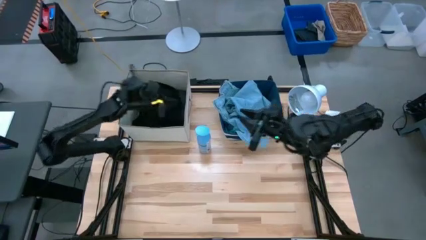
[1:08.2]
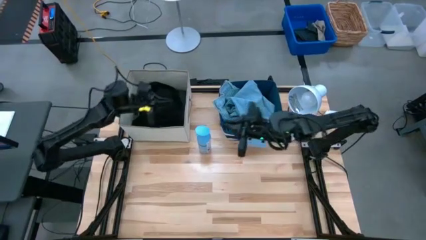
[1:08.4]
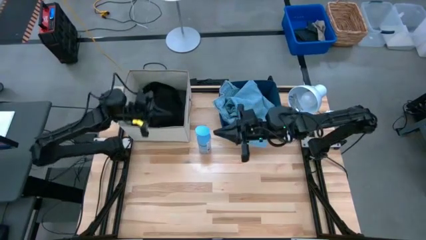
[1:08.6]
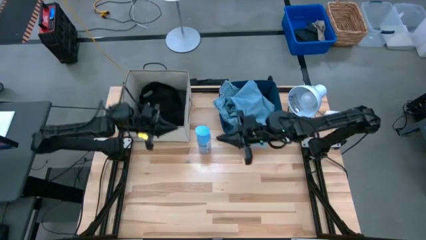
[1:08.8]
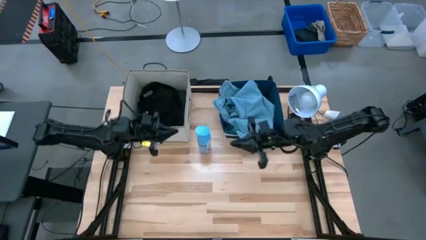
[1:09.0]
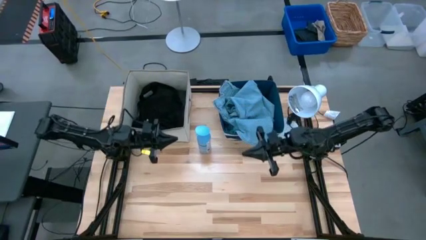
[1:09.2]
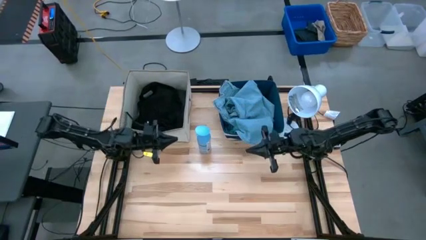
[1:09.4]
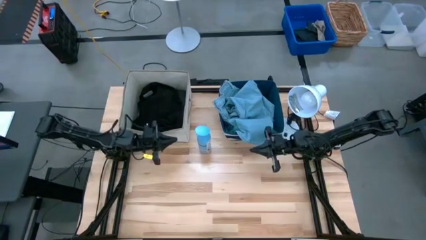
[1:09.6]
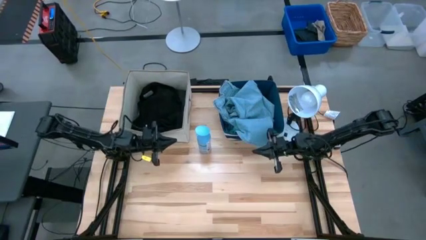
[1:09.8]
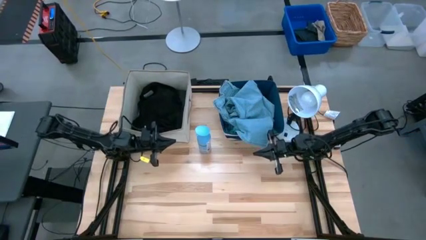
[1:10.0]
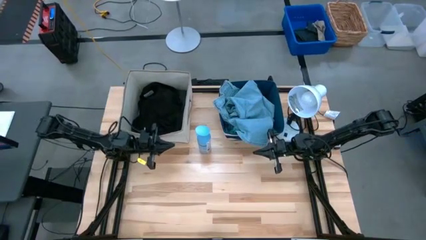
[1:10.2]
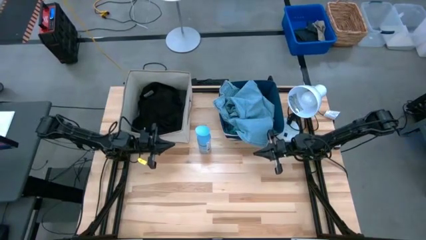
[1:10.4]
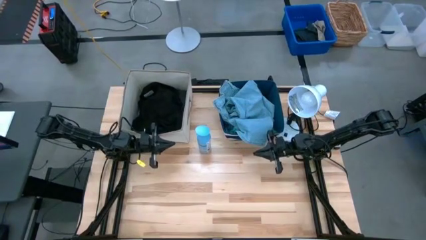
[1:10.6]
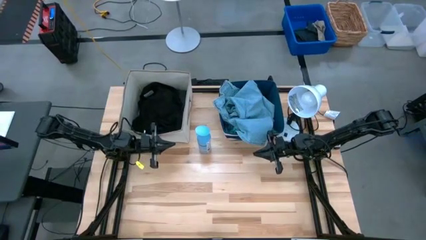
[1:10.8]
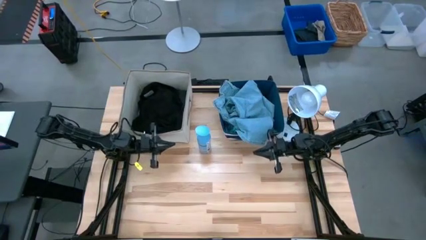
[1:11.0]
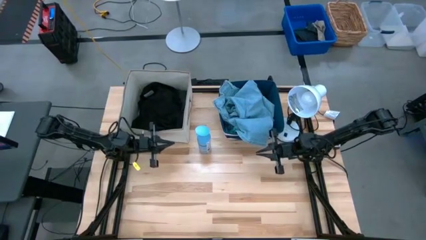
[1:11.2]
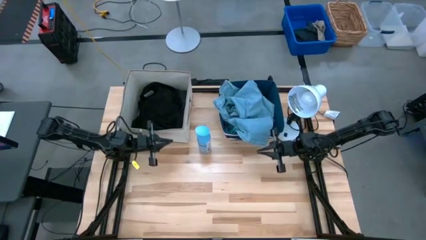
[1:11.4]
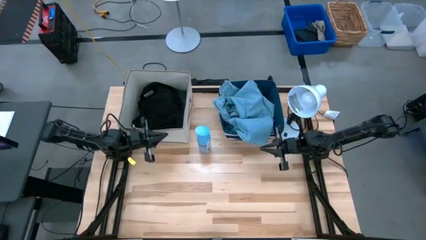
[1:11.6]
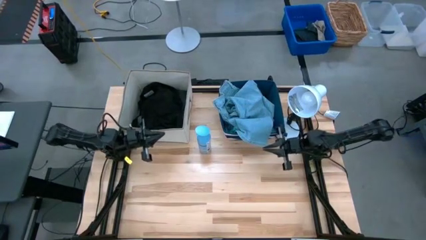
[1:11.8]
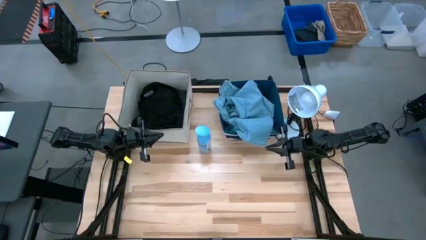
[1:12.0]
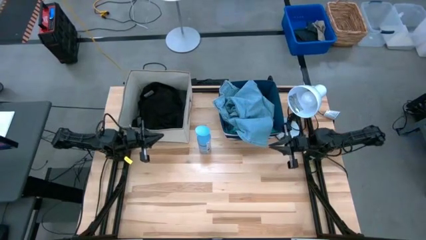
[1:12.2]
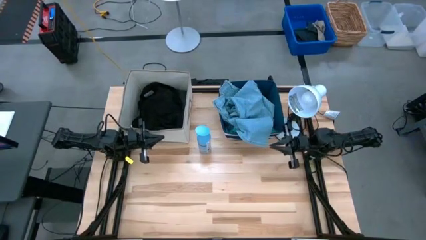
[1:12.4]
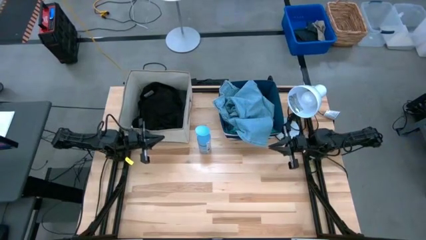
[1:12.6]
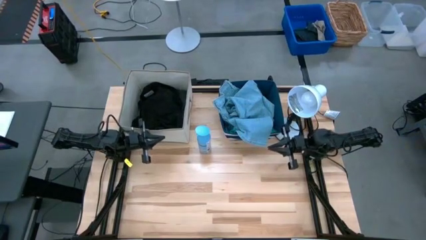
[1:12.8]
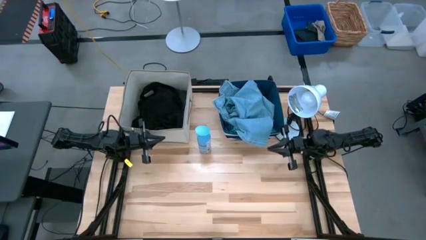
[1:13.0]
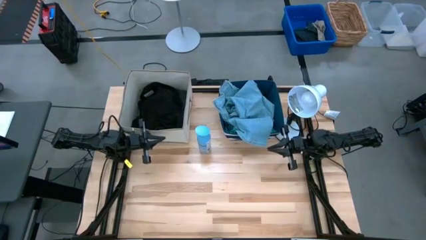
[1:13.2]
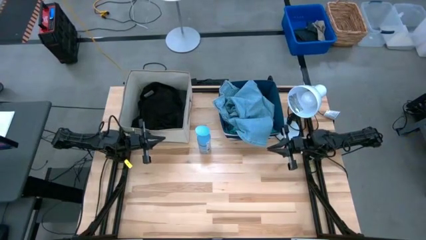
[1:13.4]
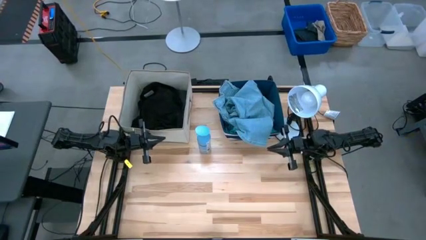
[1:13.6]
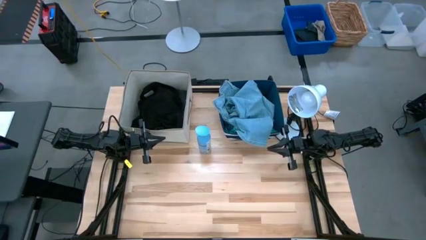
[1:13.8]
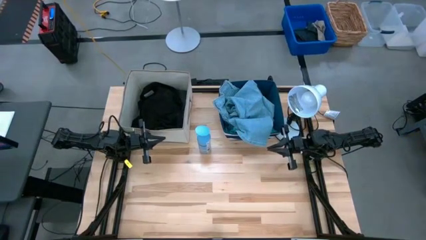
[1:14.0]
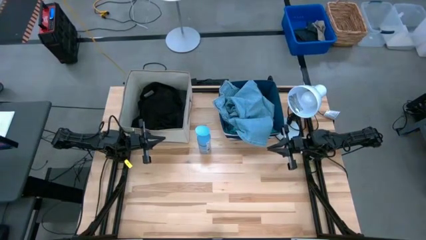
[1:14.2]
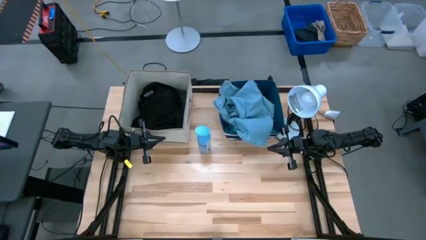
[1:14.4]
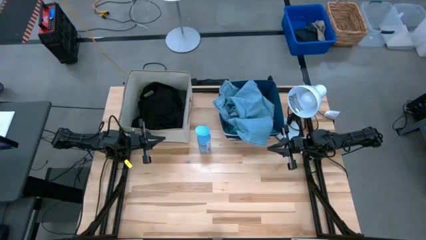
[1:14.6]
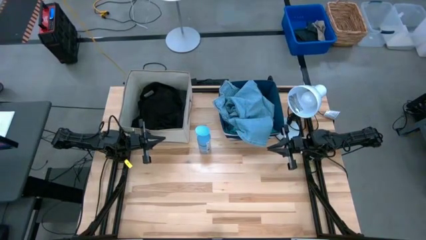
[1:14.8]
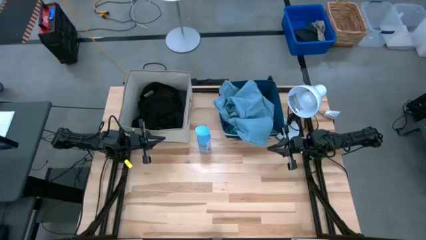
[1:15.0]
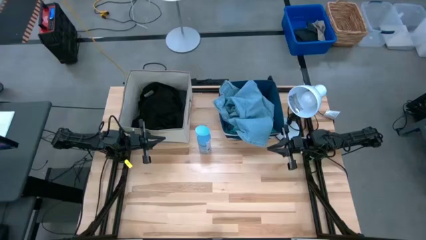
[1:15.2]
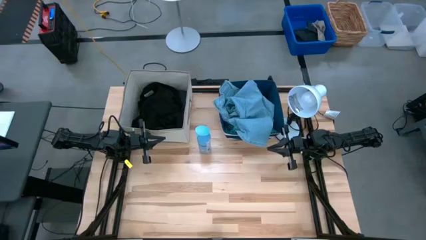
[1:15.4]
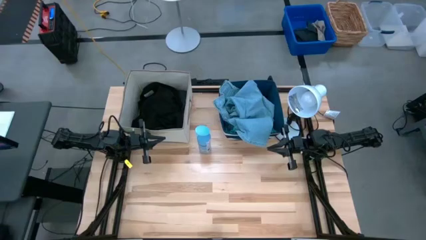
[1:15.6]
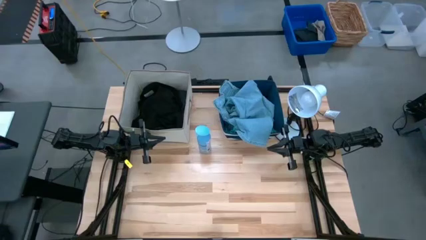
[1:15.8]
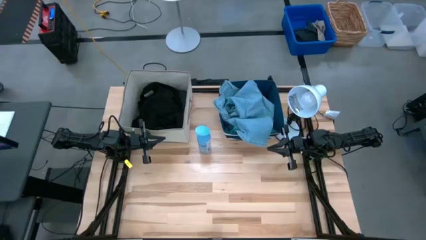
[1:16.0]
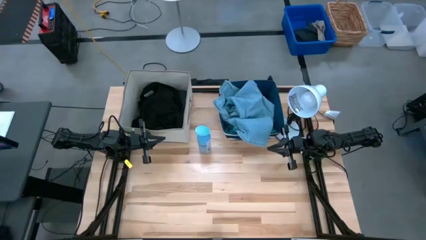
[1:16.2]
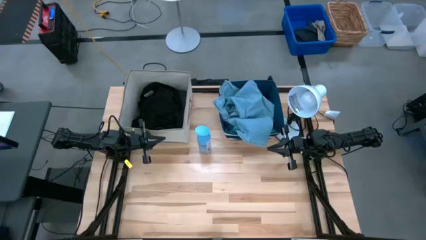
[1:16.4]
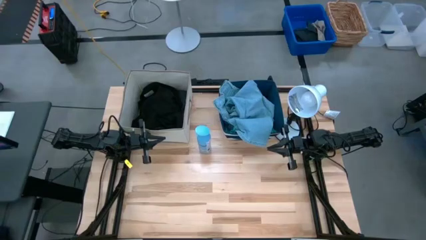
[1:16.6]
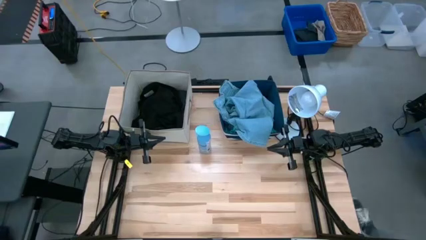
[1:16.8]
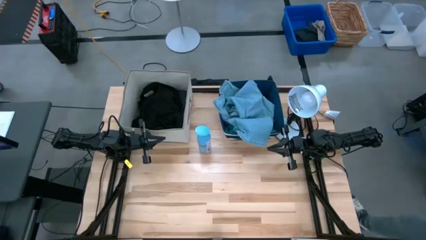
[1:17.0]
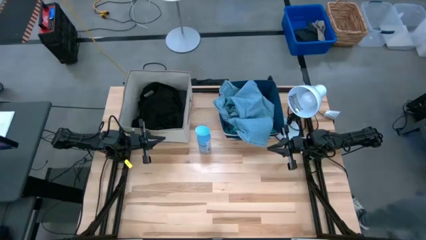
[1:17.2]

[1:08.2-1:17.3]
Task: Sort clothes
Return to Home Position

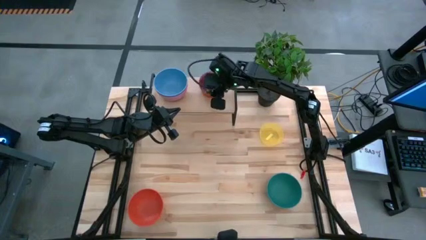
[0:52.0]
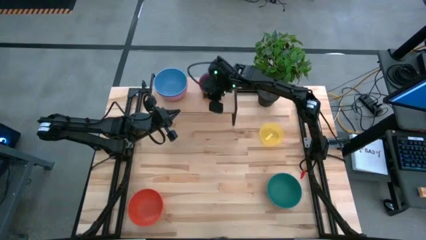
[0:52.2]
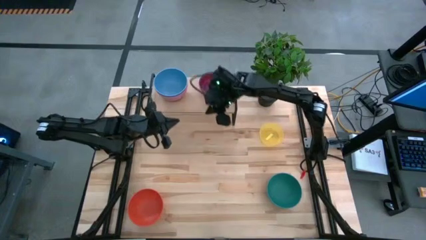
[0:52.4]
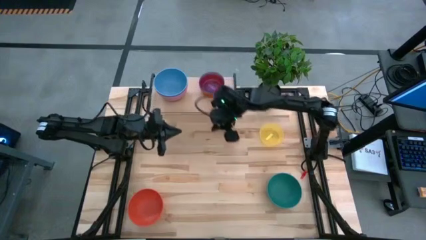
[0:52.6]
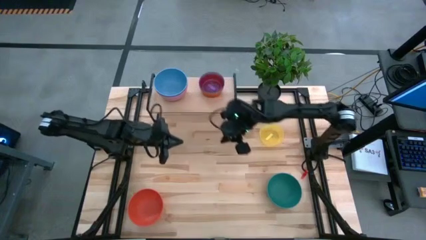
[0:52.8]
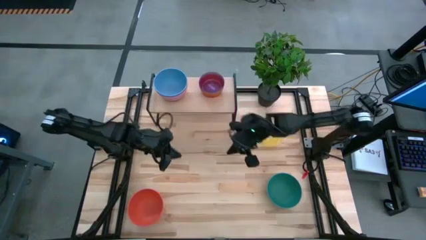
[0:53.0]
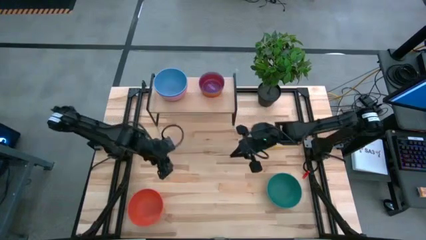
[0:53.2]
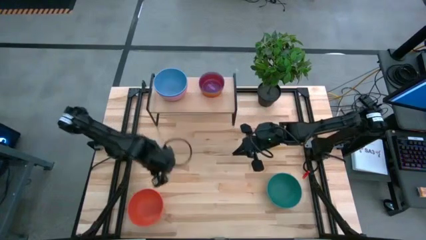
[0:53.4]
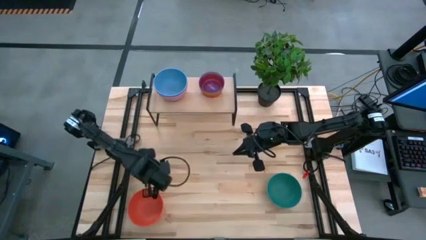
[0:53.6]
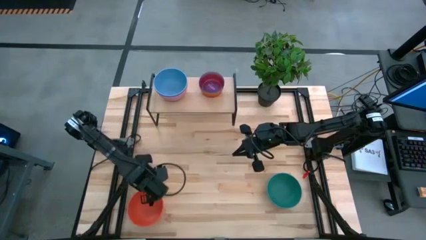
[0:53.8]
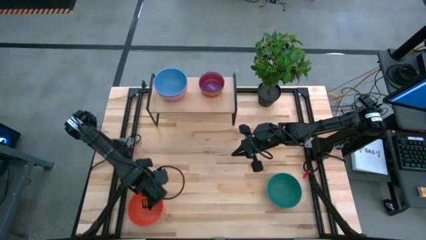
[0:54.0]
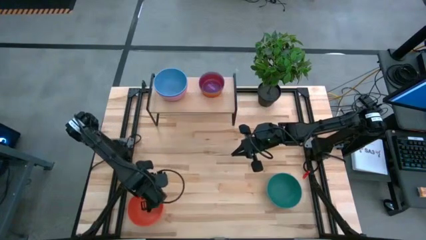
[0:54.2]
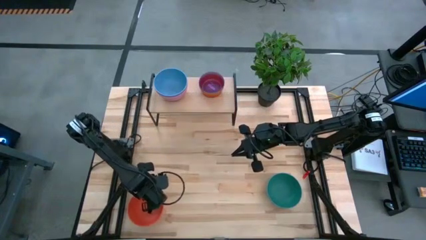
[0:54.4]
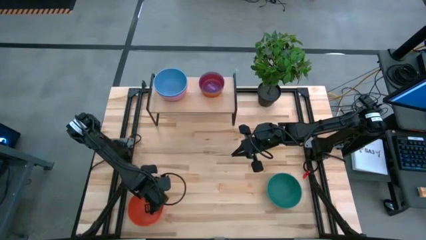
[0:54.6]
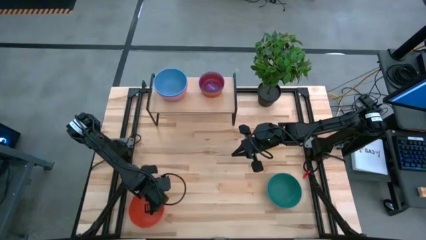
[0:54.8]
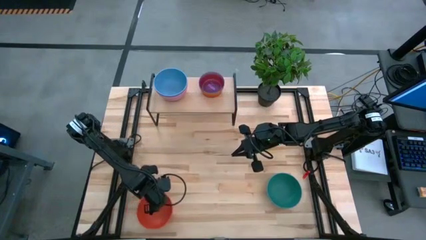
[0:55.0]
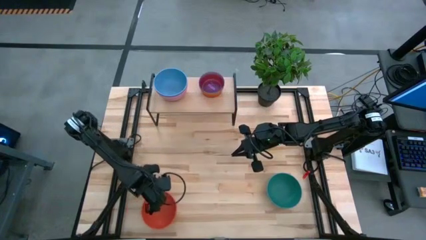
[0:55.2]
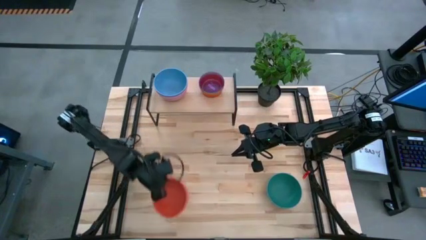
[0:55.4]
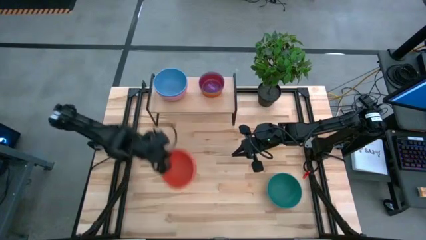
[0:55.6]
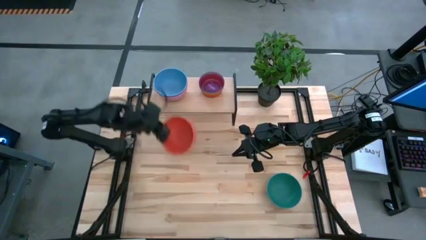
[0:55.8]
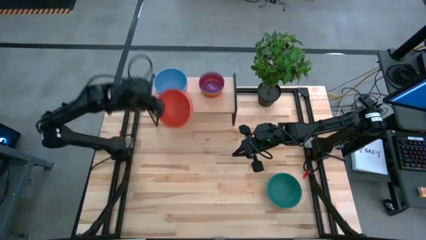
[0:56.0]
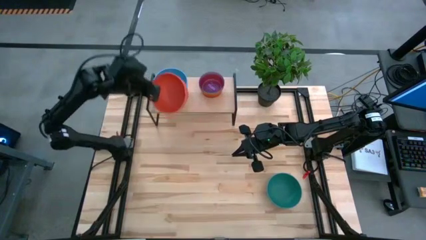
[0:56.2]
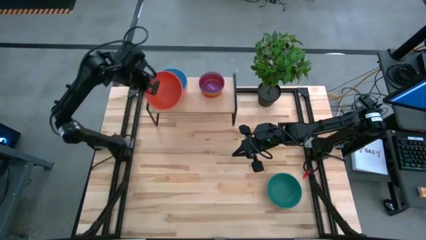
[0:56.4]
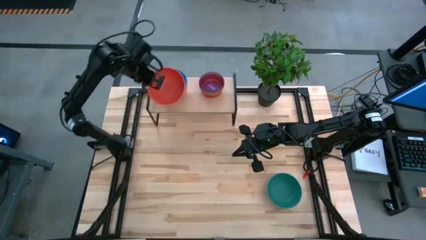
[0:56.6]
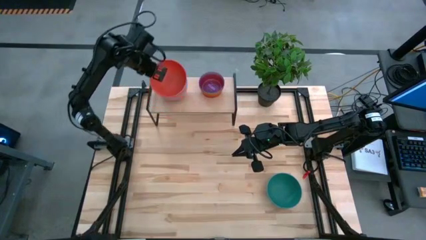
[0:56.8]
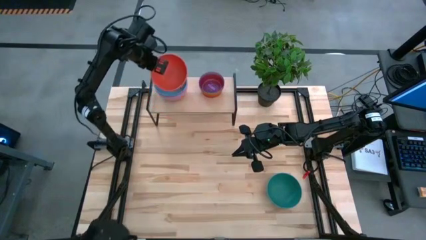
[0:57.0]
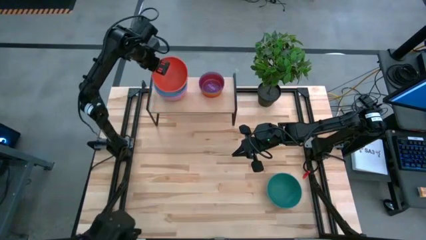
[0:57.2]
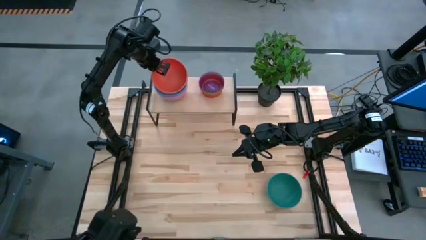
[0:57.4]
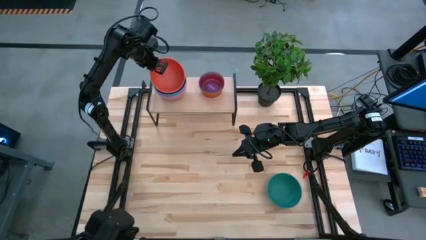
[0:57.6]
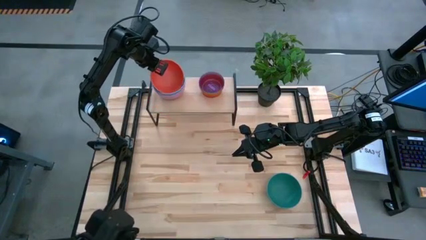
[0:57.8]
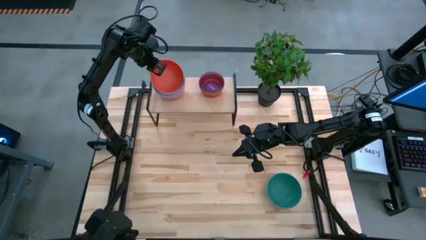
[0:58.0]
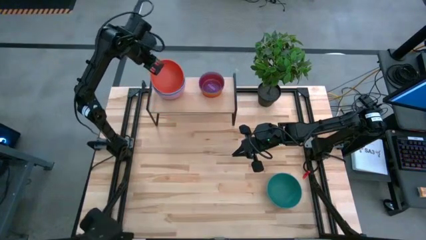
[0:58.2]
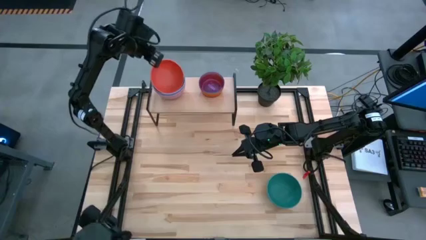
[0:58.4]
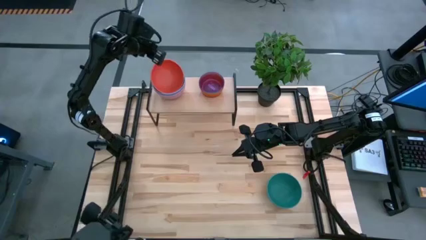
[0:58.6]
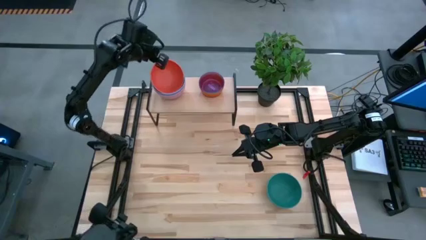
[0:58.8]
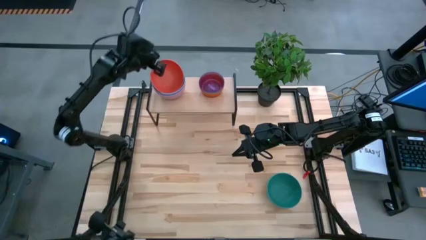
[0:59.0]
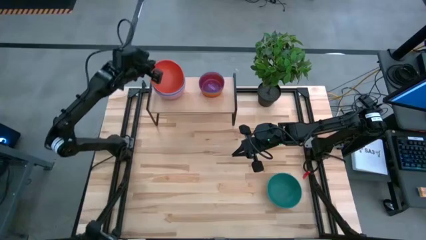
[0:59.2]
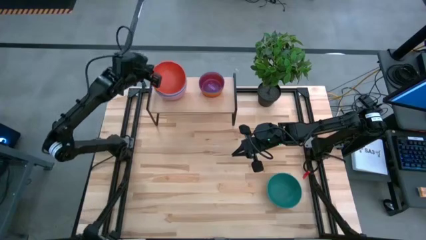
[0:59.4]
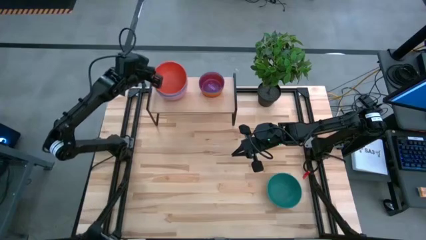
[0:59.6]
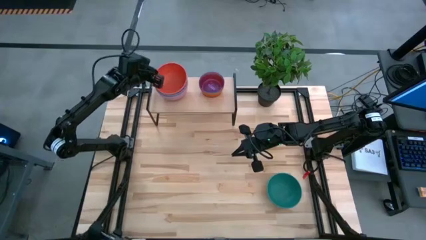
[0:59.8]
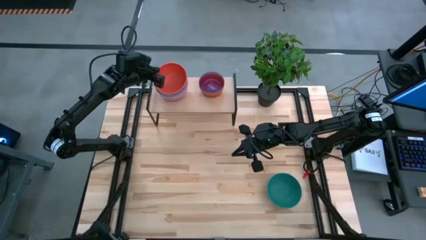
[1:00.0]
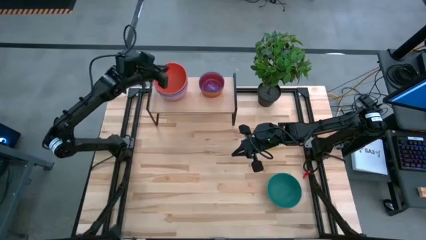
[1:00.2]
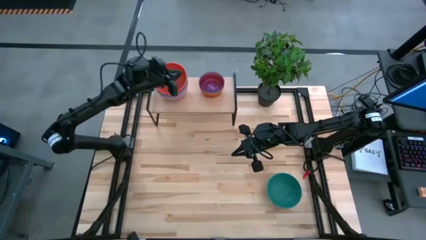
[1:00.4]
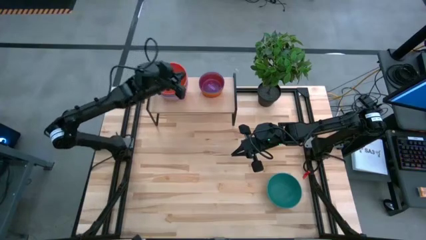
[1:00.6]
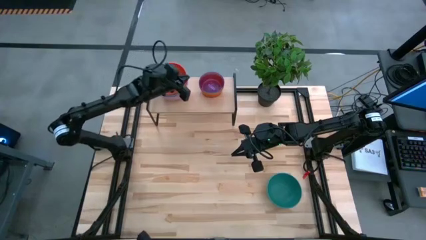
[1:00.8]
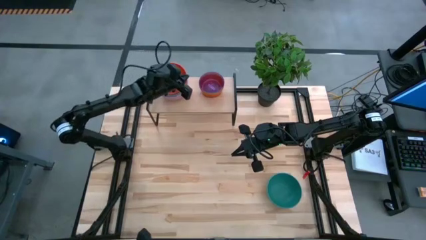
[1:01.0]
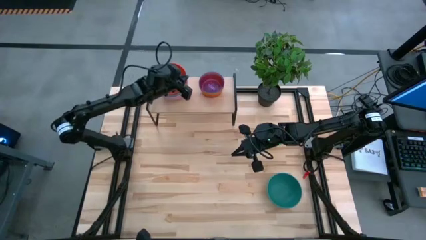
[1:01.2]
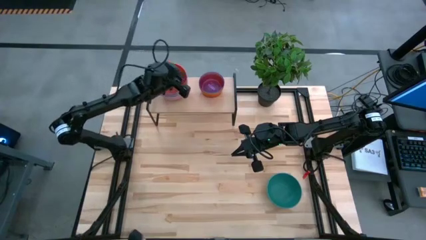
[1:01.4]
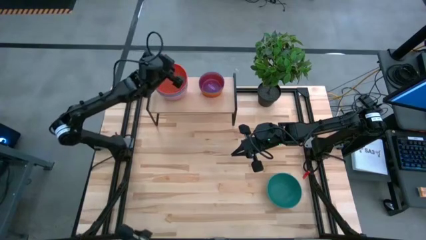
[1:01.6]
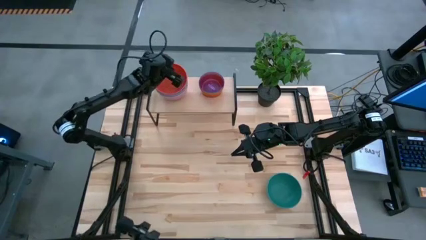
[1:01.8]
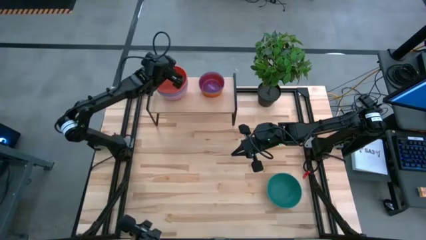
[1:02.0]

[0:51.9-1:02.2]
Task: Place and stack bowls onto a shelf
Stack the big orange bowl on top of the big blue bowl on the shelf
